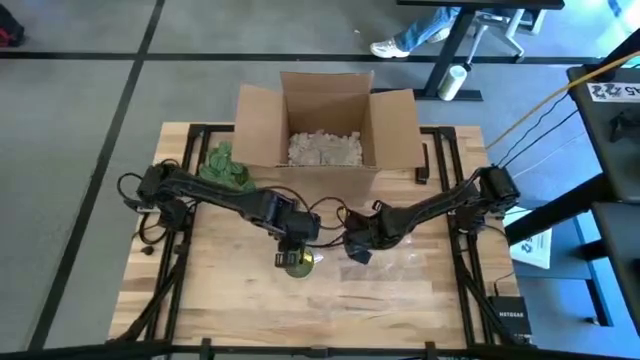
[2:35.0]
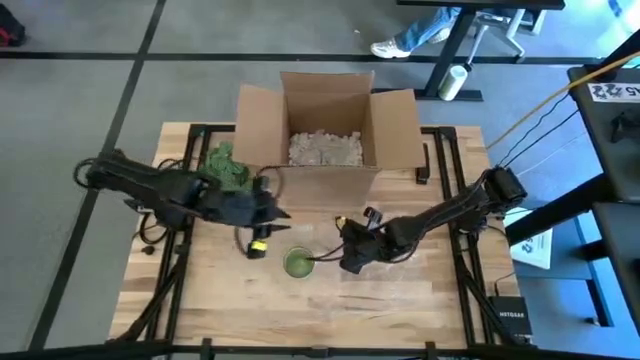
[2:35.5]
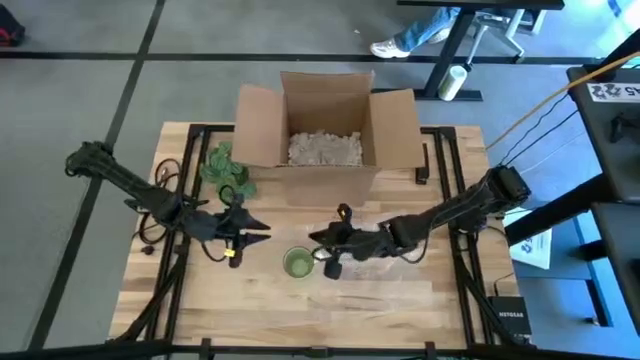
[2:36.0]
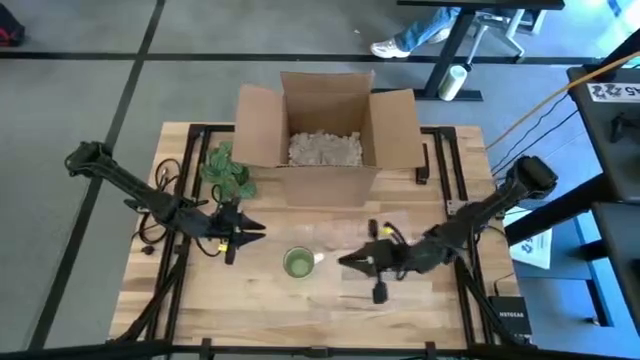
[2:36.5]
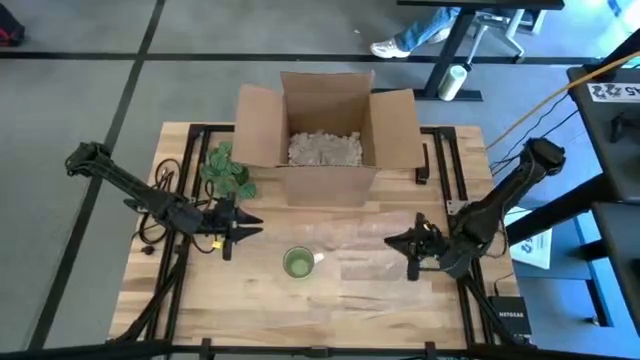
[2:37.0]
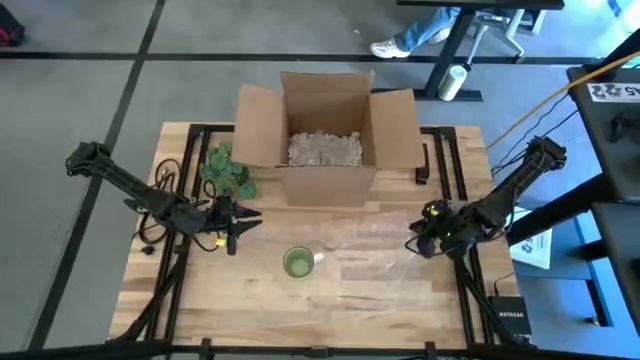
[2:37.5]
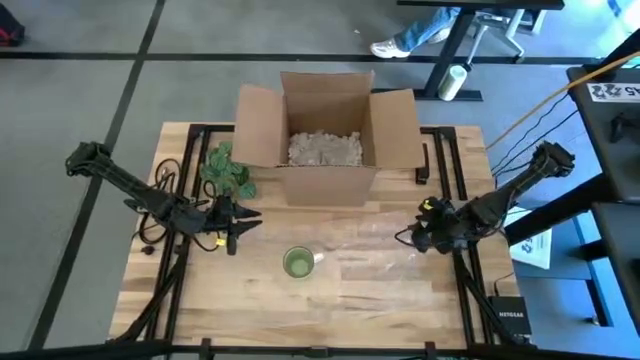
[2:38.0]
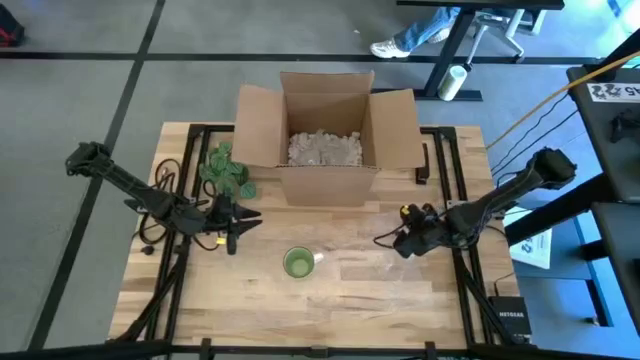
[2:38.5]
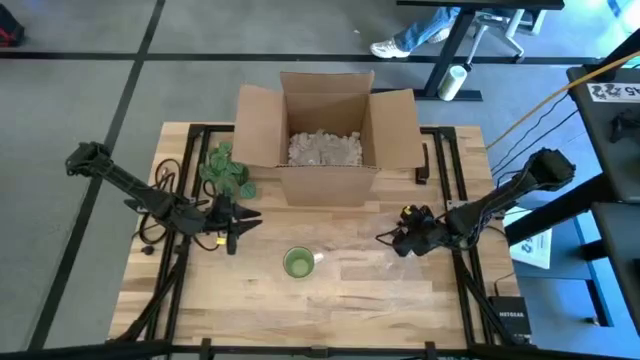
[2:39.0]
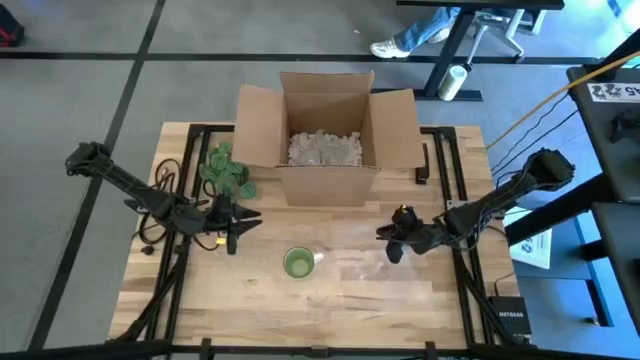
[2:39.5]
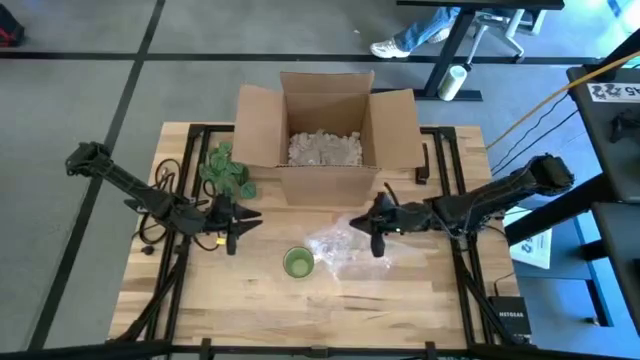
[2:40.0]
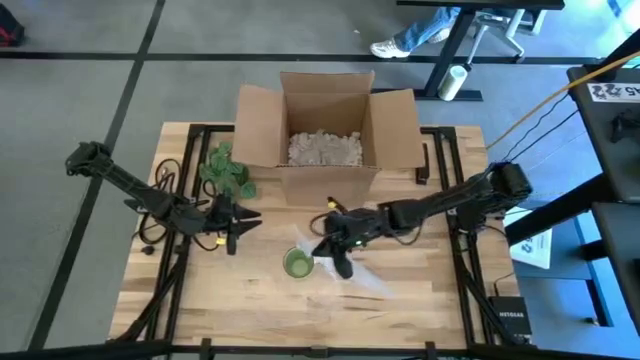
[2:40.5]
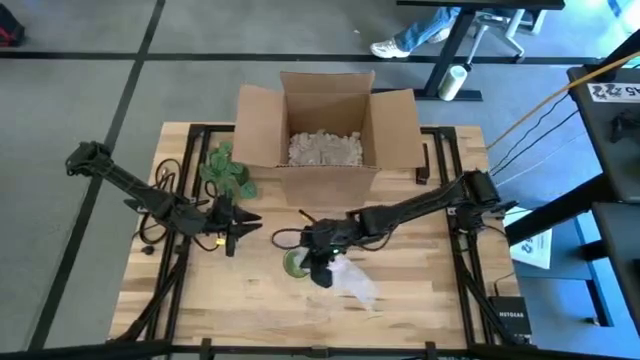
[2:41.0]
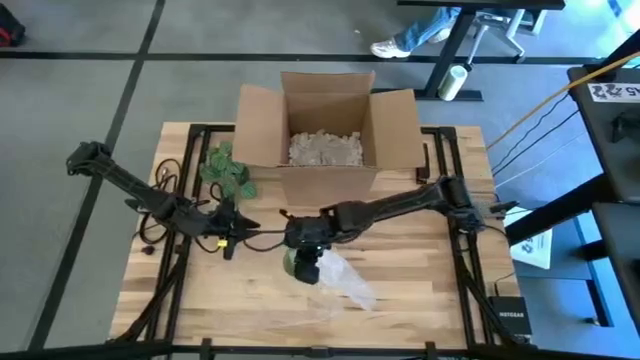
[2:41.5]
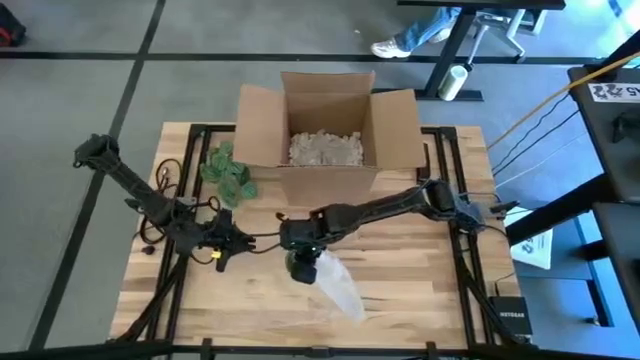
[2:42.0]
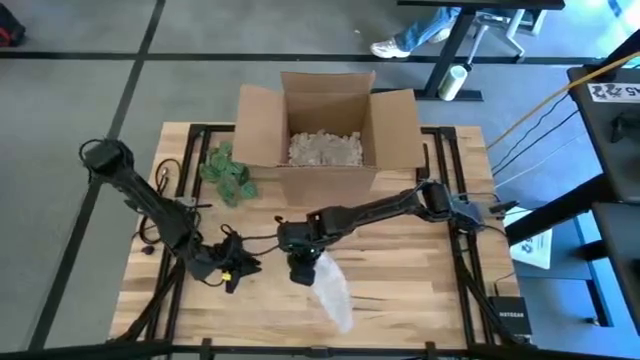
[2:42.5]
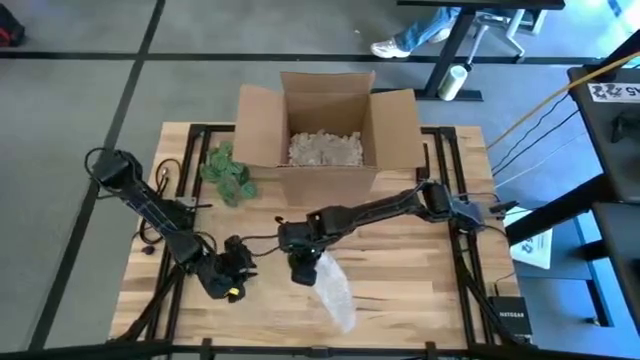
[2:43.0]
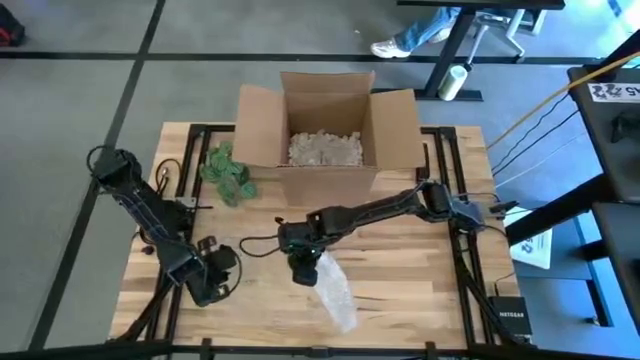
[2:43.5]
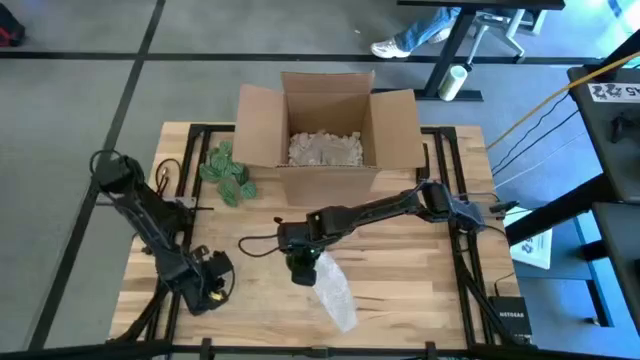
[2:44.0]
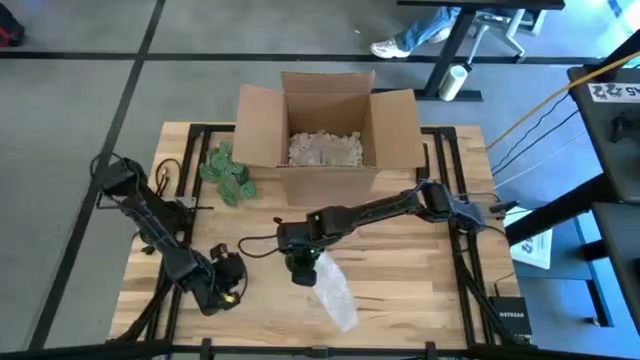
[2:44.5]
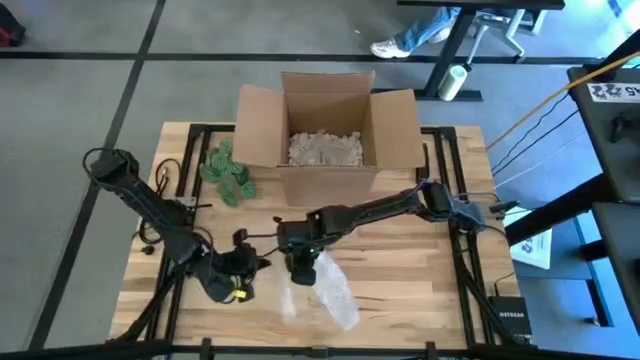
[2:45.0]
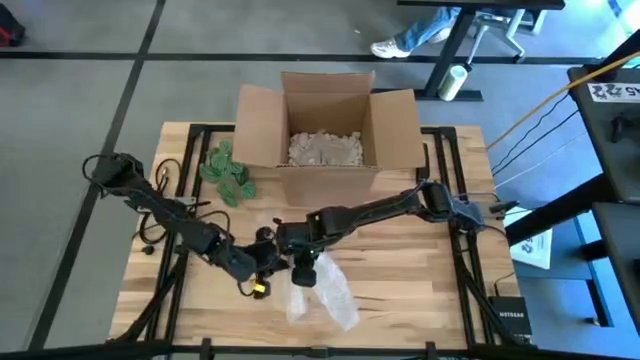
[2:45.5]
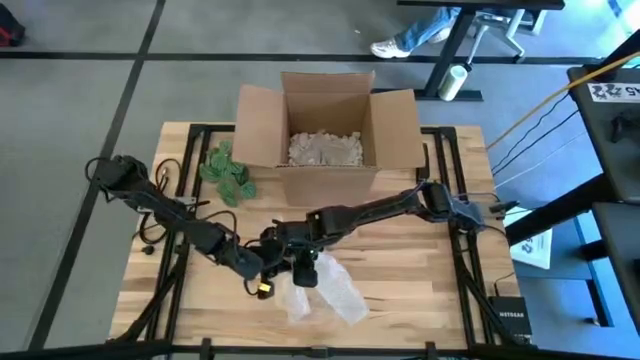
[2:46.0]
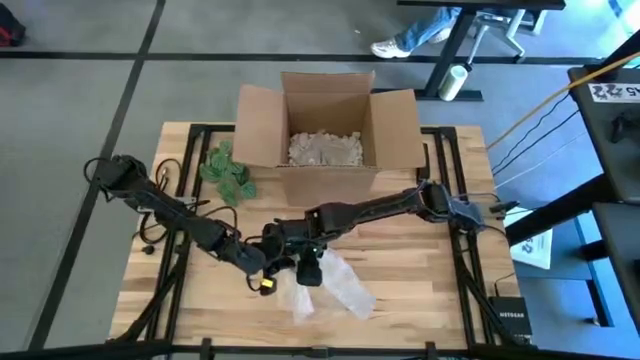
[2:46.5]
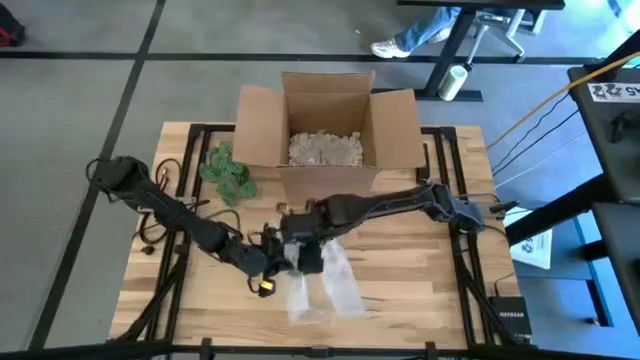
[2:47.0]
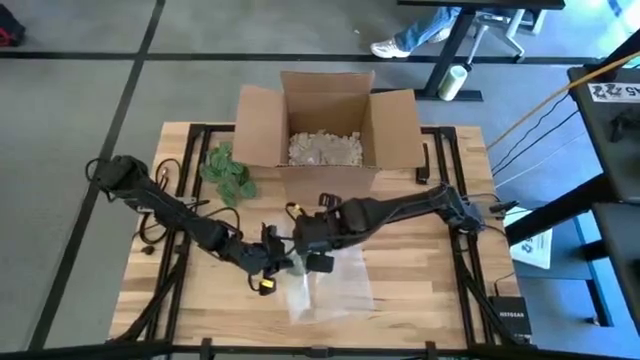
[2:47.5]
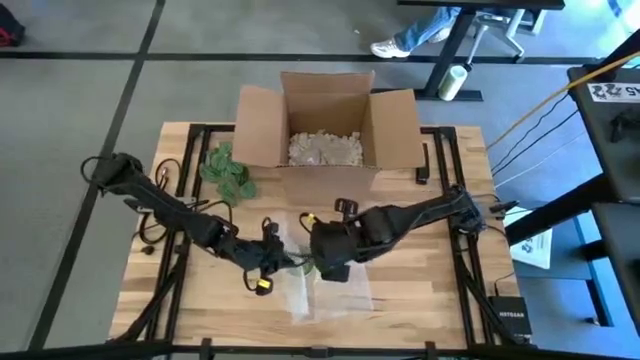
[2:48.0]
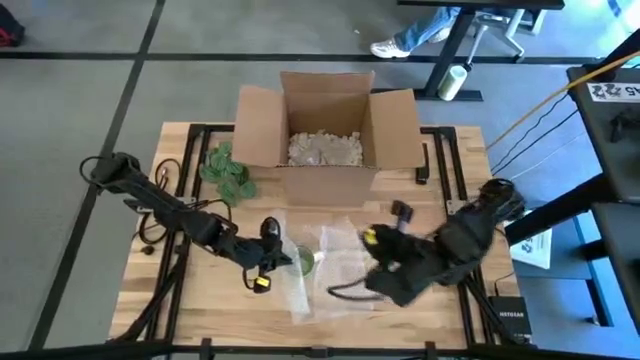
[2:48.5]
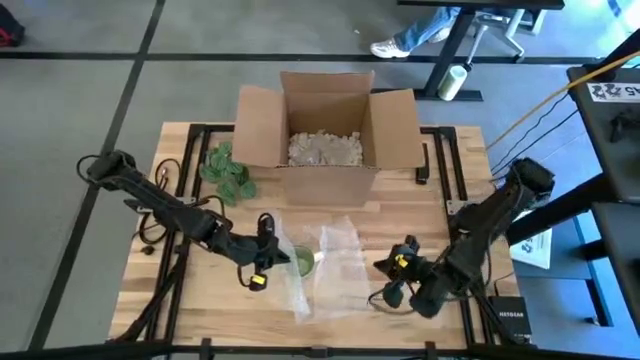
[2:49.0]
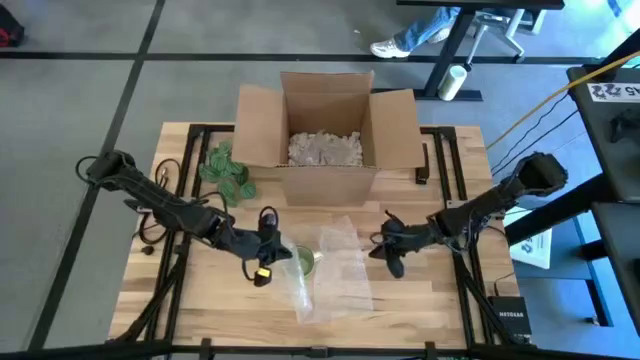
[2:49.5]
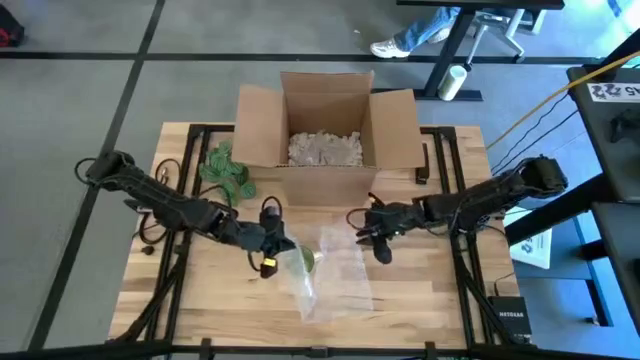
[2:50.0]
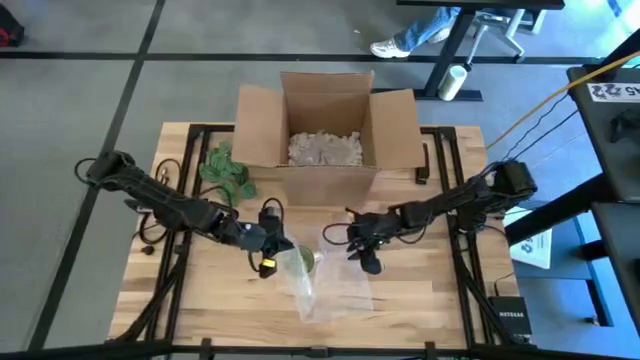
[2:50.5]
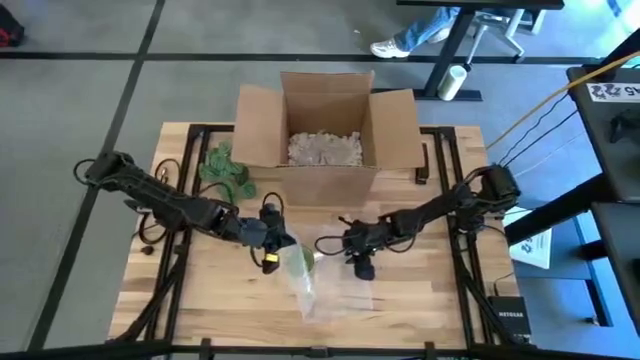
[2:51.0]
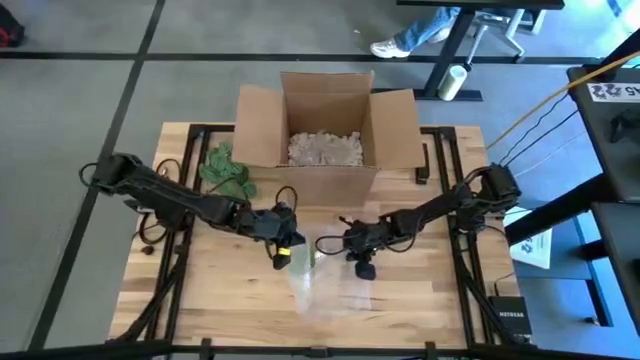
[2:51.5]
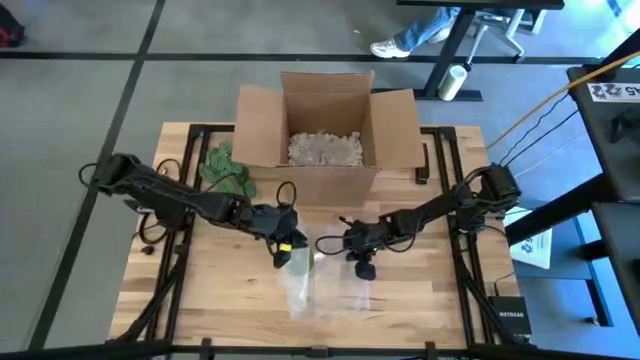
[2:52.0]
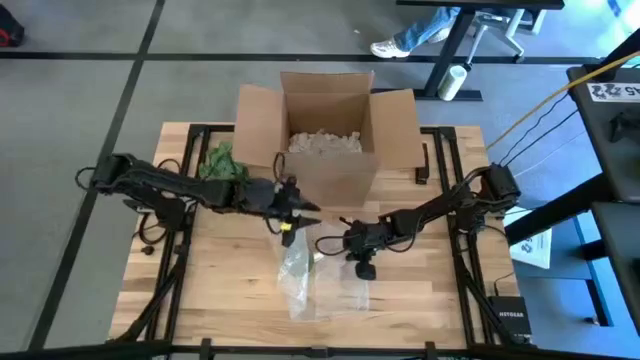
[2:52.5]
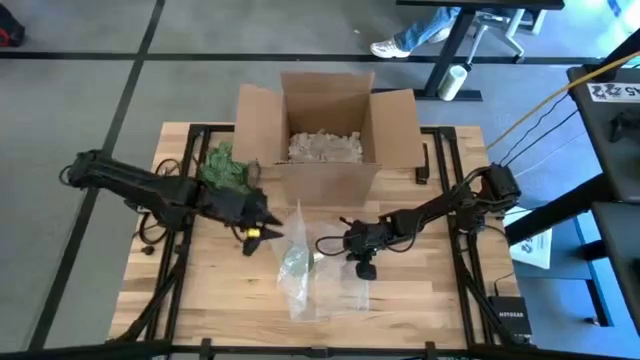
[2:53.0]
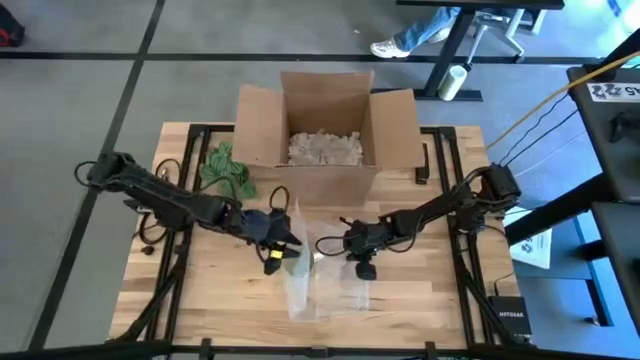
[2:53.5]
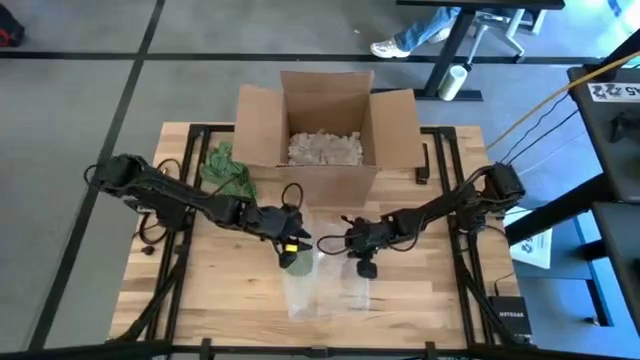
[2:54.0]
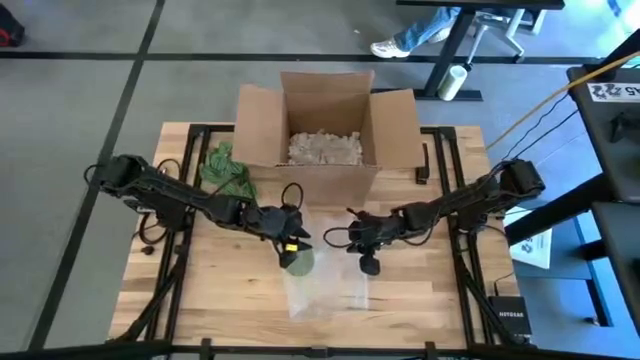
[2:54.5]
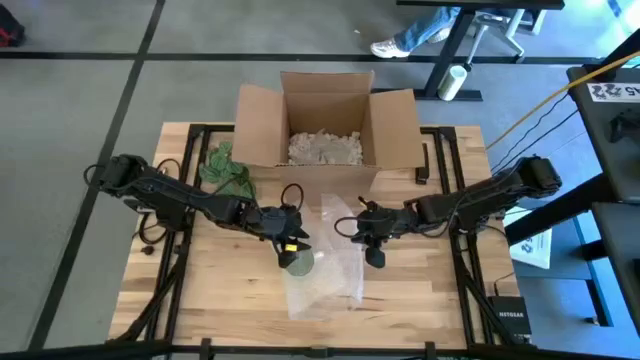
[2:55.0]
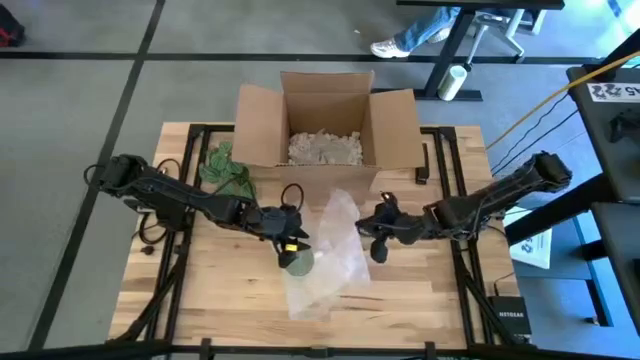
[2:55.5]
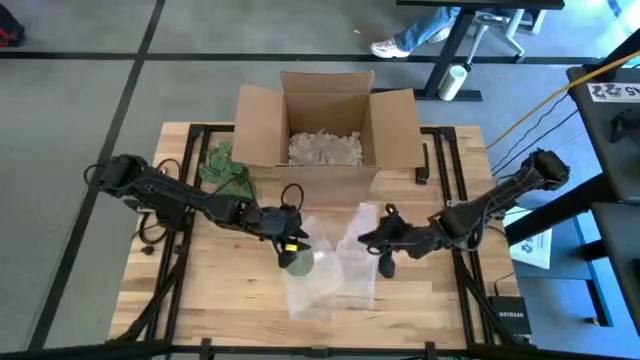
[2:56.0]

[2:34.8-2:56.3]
Task: wrap mug
Wrap the green mug in bubble wrap
